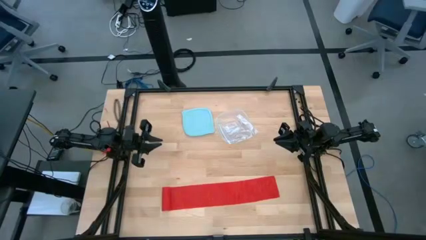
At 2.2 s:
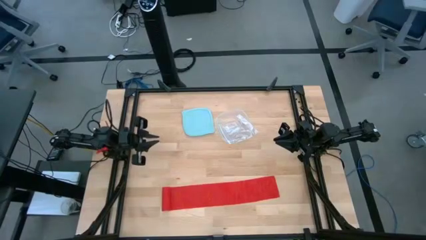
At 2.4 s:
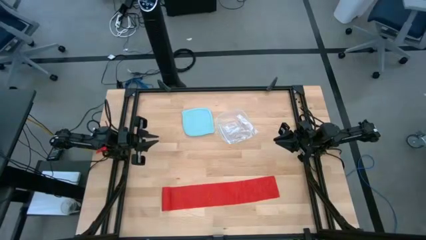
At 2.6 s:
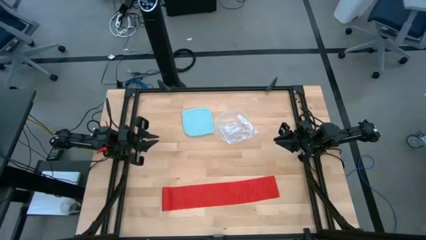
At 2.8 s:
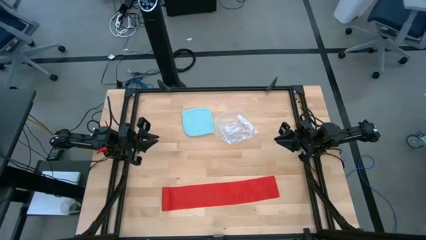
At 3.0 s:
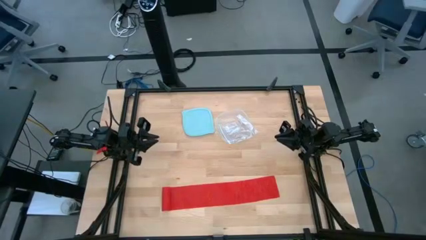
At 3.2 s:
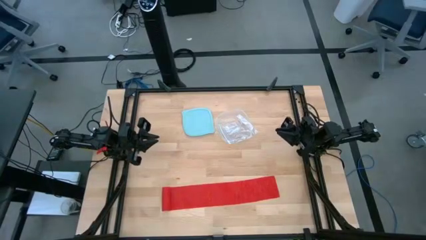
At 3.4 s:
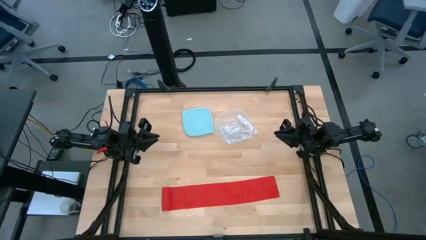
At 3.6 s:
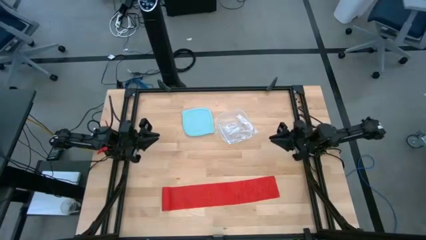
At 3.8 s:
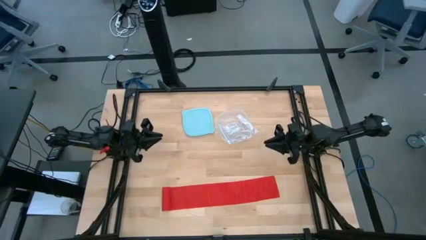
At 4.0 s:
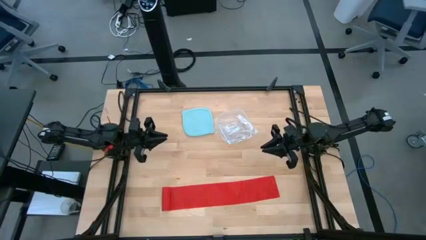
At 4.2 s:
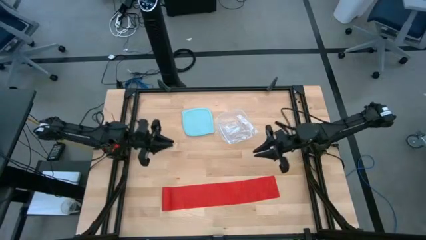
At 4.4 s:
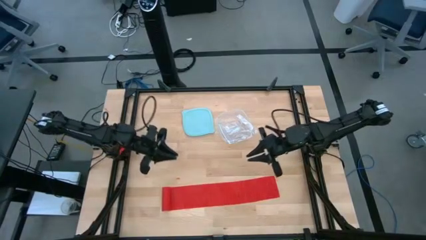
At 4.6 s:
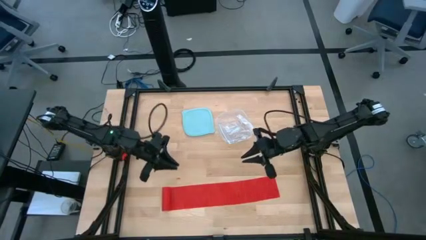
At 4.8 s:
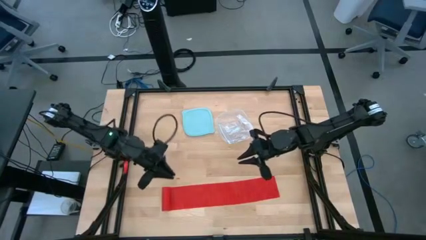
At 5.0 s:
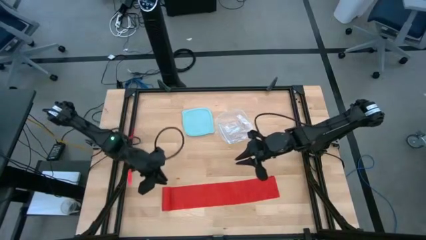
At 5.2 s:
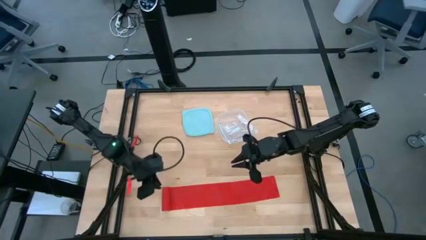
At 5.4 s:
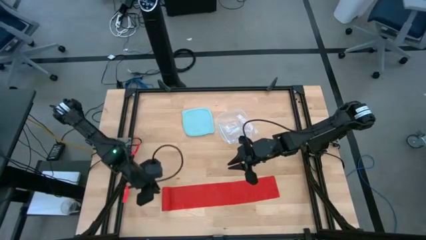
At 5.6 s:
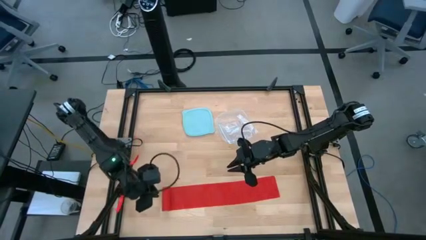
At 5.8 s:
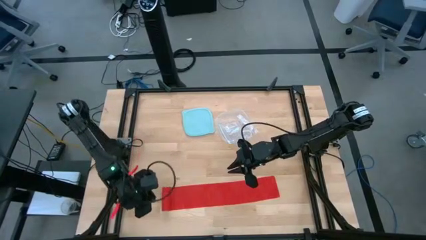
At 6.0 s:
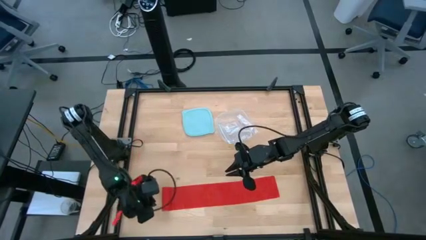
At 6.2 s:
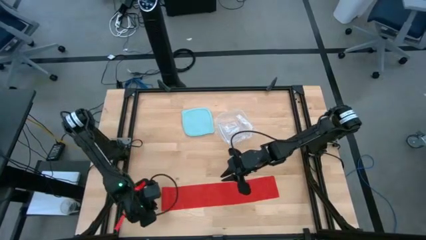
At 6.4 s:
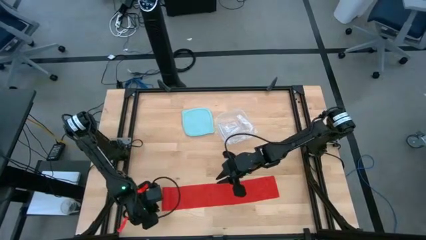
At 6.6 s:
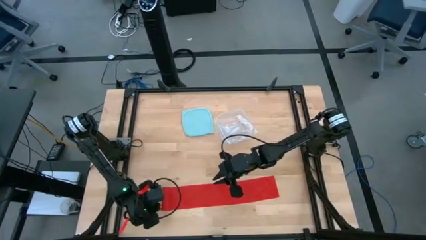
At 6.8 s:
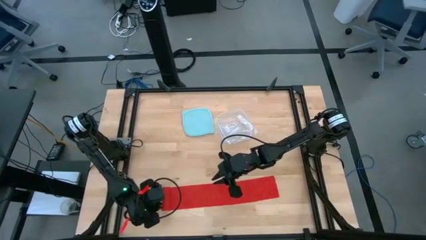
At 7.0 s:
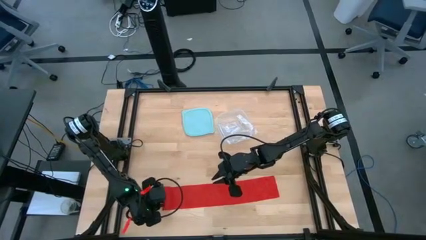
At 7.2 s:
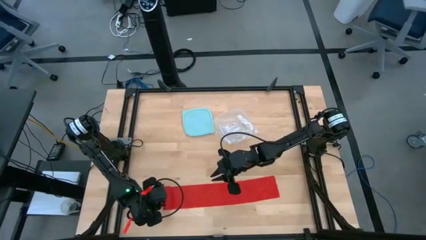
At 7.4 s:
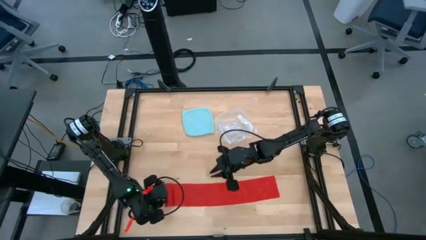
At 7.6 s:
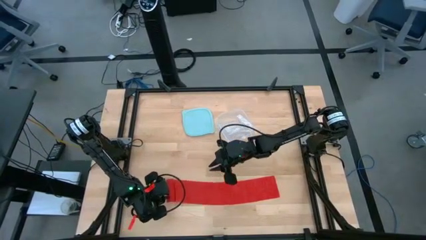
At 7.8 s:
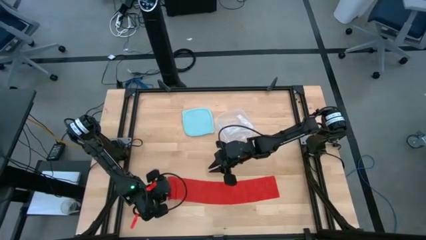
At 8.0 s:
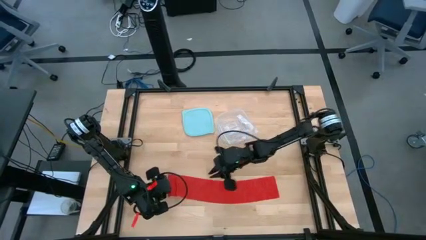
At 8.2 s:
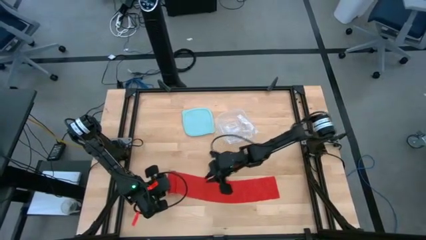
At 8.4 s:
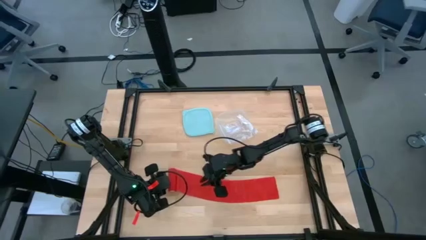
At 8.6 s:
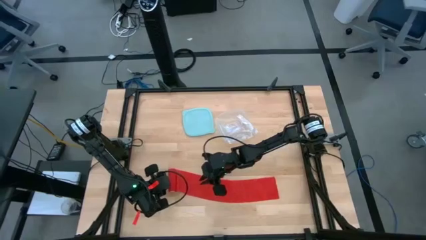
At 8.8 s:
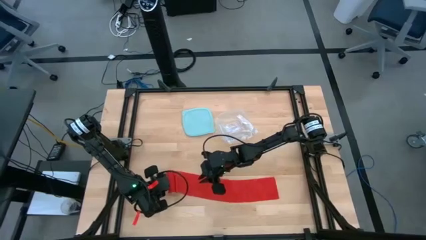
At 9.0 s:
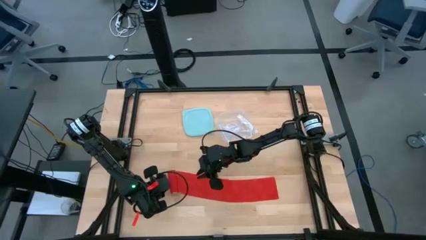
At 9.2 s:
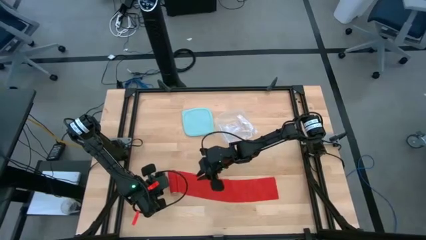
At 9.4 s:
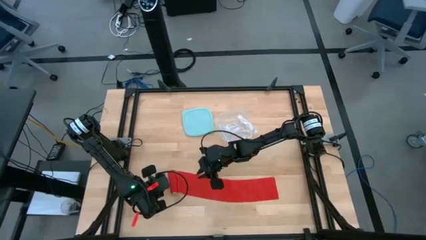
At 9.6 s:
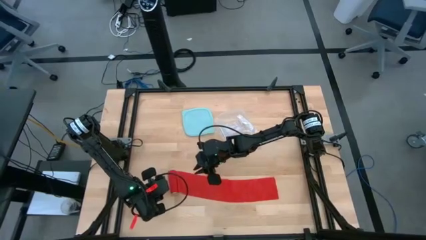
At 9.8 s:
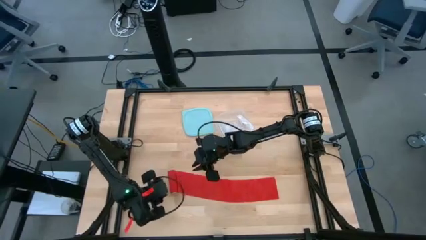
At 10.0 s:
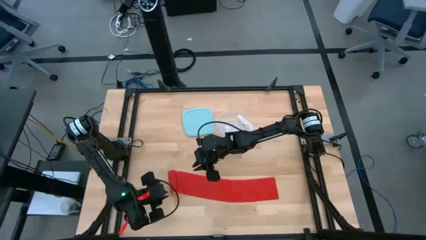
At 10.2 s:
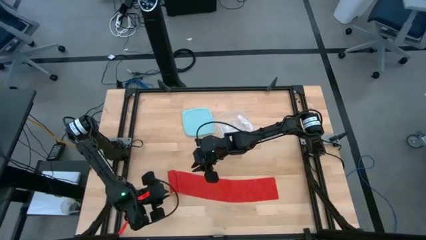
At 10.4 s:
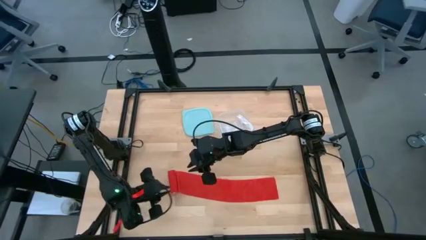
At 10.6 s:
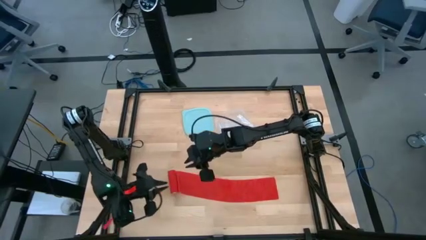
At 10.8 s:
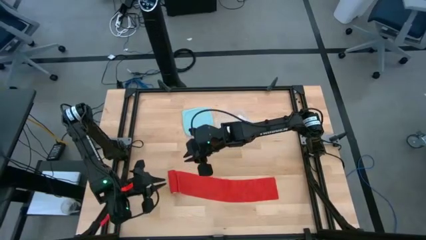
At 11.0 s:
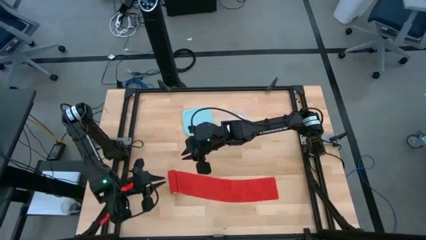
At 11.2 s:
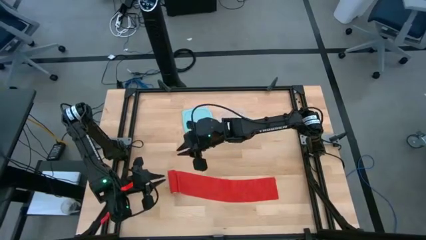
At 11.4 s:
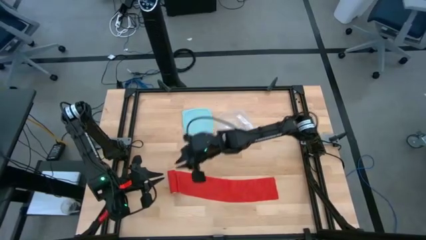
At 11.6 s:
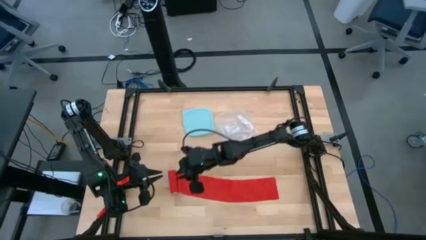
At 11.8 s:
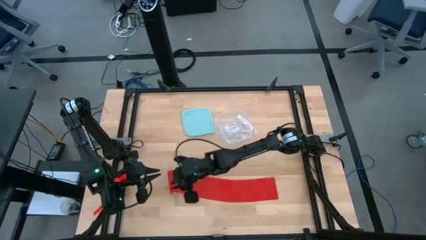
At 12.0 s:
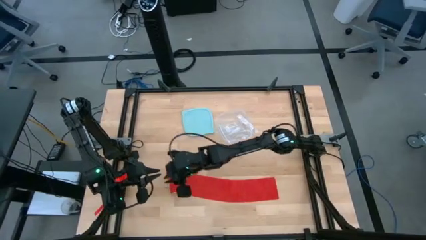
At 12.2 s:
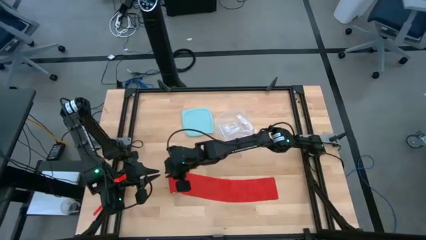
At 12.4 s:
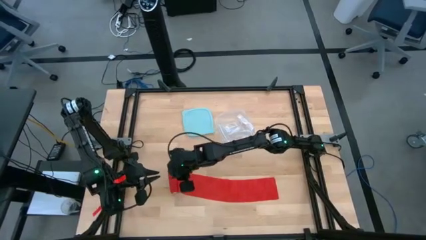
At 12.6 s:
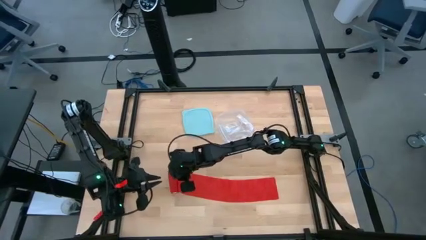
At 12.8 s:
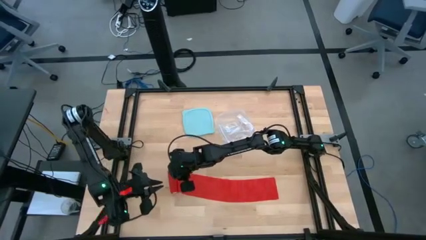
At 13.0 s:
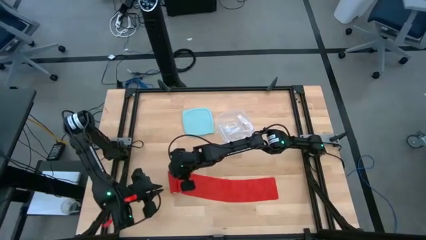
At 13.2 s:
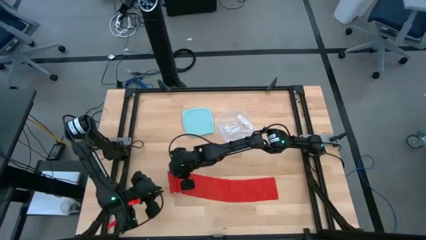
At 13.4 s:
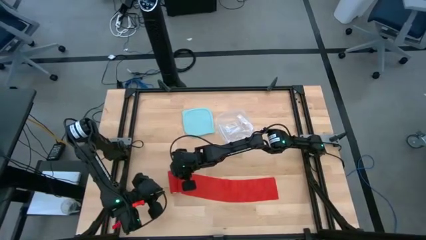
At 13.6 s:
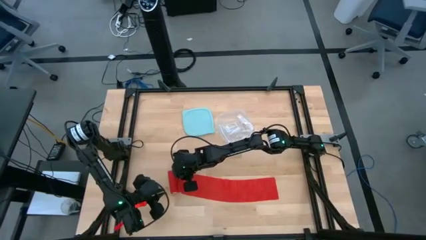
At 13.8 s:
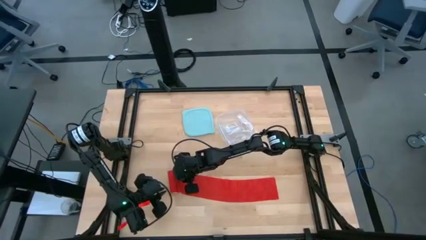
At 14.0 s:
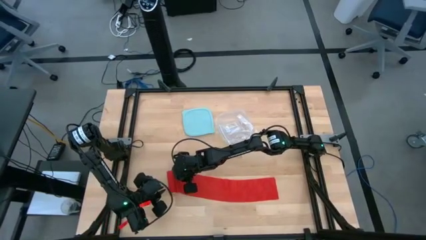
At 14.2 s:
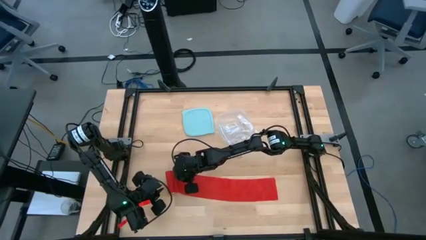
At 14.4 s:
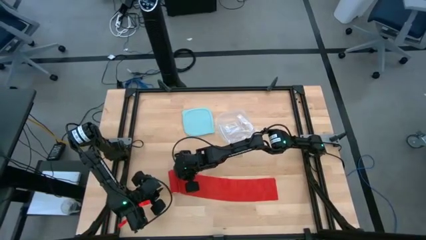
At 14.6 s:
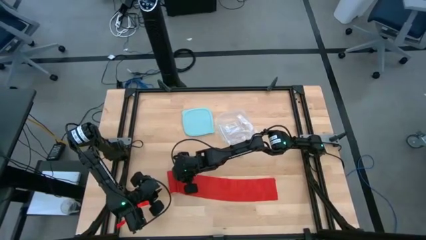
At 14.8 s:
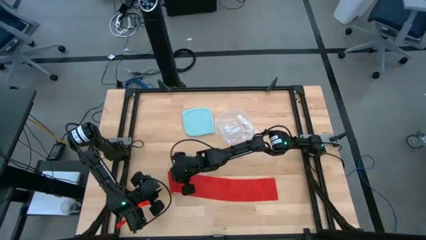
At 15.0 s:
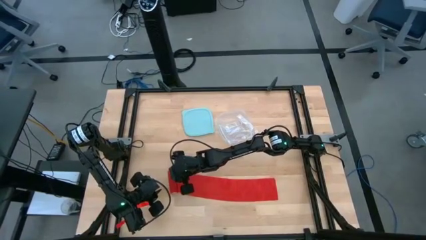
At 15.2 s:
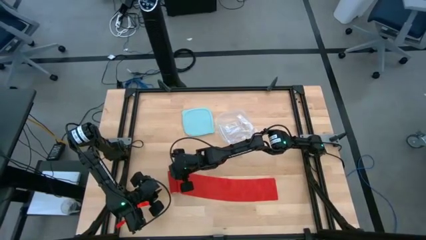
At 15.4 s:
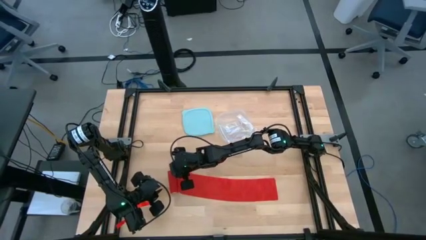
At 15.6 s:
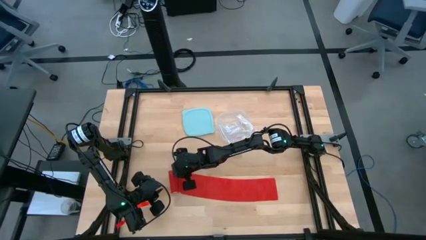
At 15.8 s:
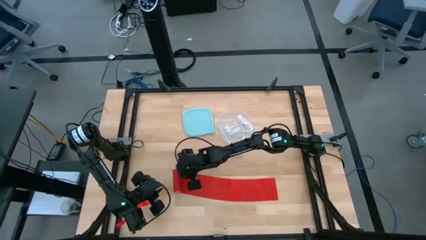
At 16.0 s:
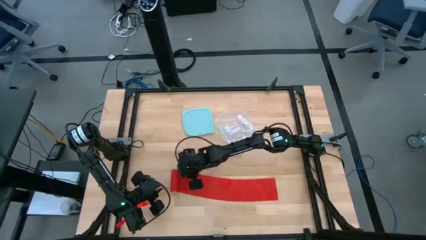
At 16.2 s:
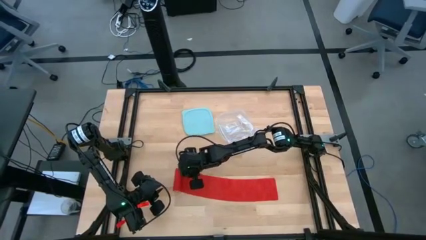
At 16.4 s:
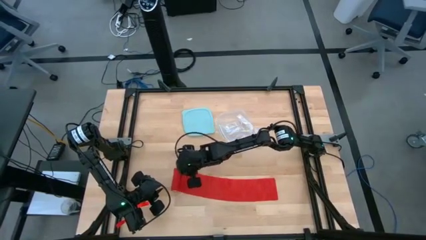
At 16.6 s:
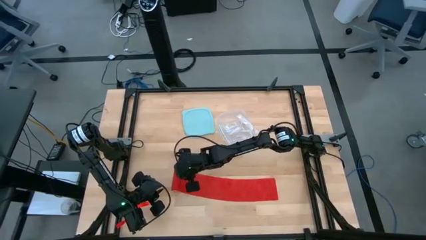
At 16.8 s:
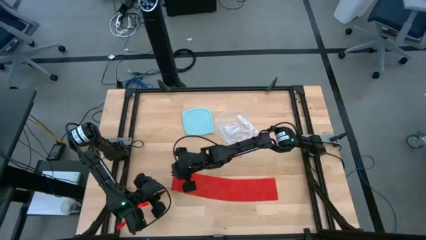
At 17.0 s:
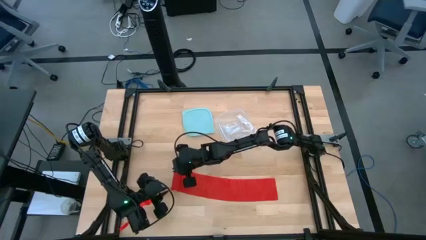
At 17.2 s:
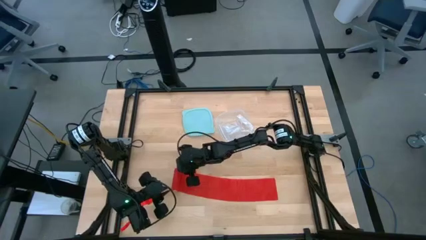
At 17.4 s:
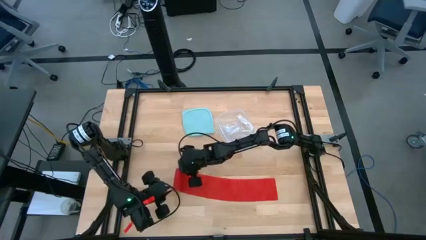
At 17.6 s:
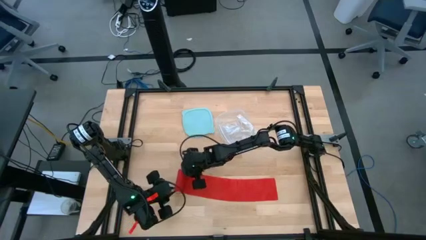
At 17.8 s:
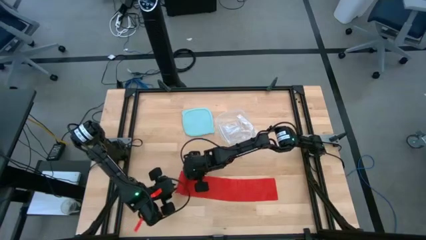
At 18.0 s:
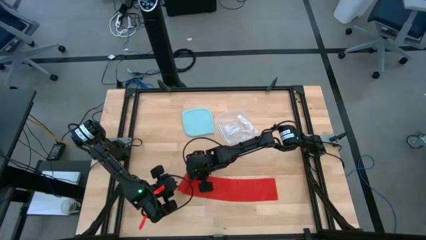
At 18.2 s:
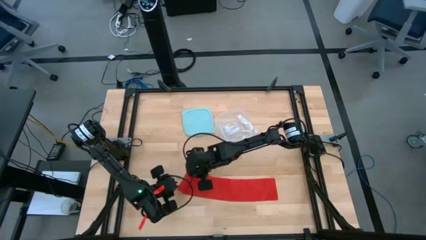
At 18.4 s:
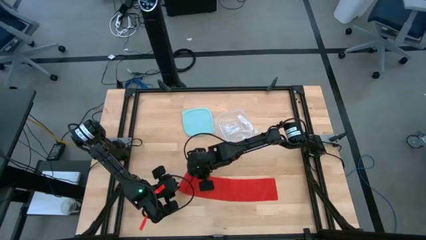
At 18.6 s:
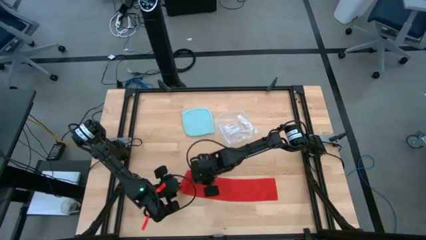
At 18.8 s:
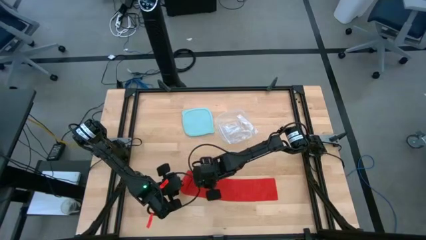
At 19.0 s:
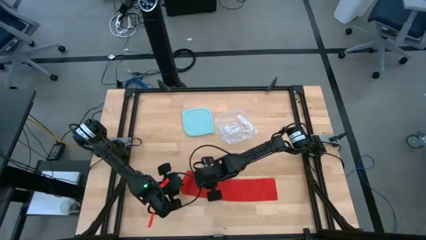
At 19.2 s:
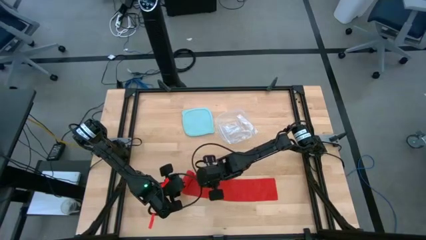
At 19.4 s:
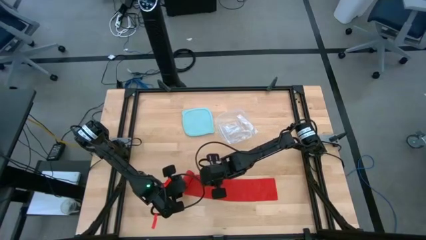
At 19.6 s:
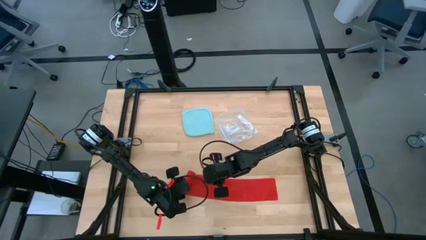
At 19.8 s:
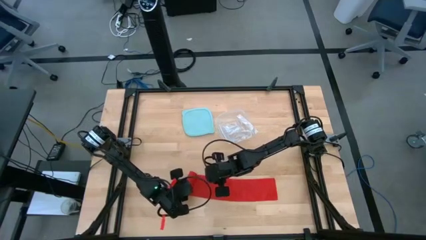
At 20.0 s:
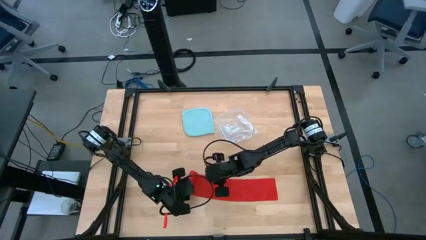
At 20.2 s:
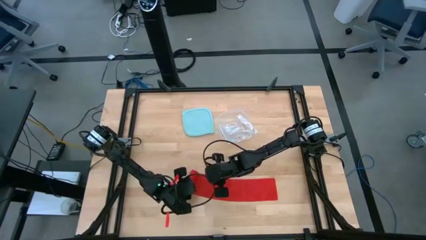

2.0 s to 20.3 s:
Task: Roll bandage
Roll the red bandage
